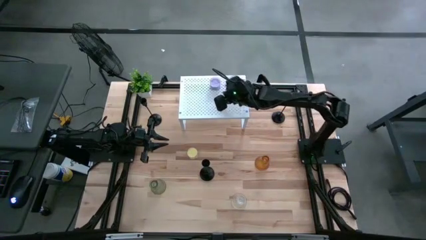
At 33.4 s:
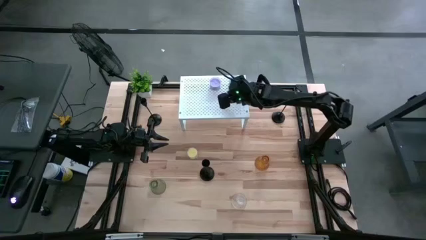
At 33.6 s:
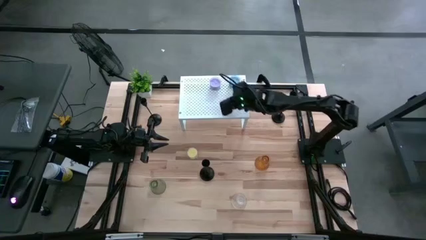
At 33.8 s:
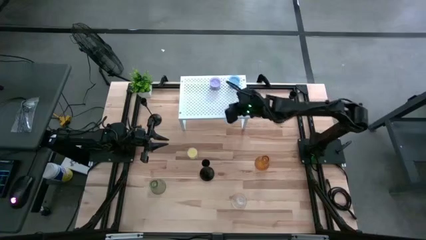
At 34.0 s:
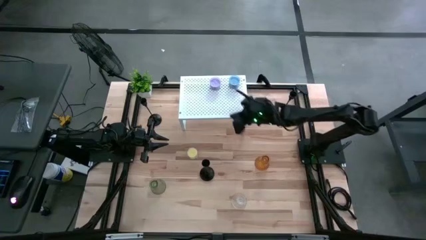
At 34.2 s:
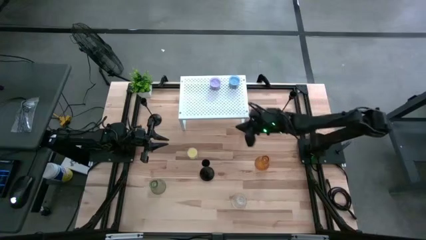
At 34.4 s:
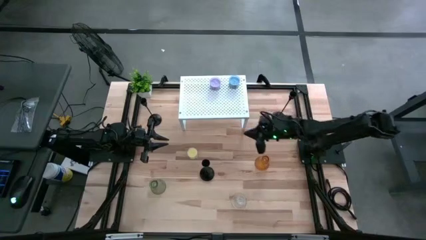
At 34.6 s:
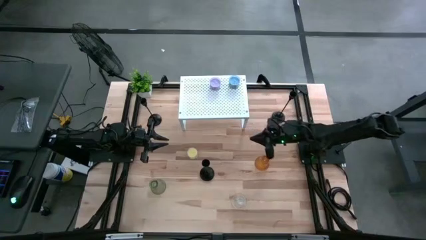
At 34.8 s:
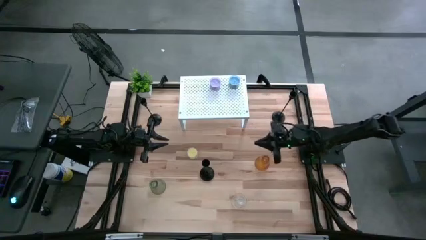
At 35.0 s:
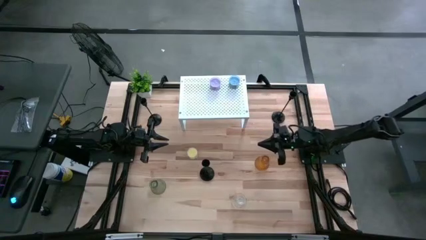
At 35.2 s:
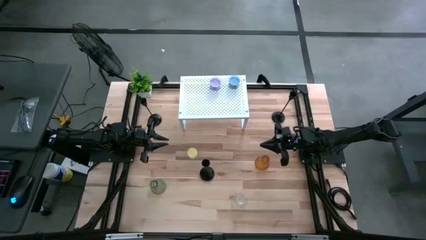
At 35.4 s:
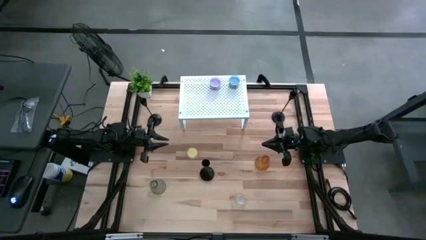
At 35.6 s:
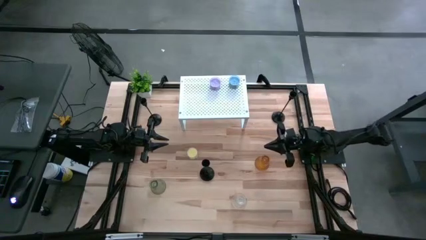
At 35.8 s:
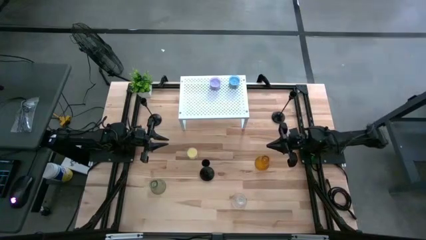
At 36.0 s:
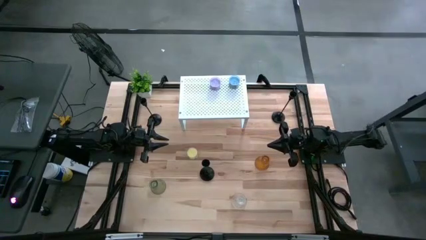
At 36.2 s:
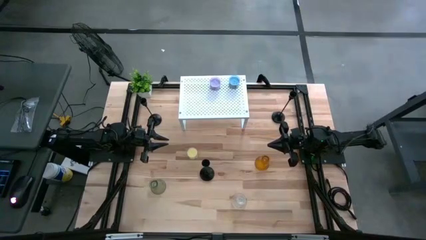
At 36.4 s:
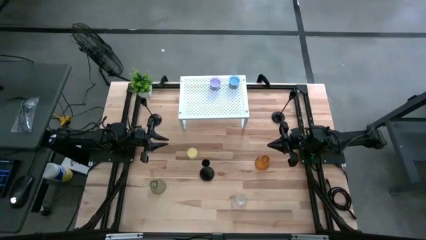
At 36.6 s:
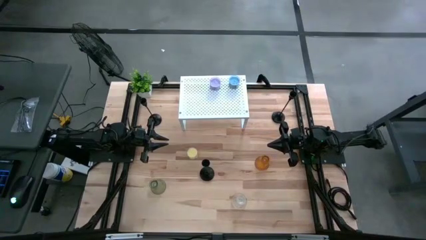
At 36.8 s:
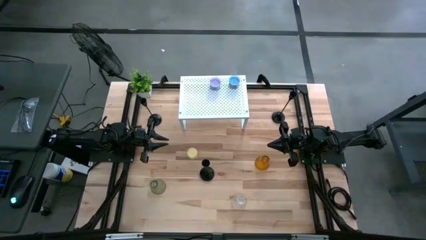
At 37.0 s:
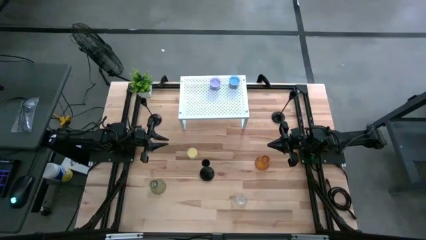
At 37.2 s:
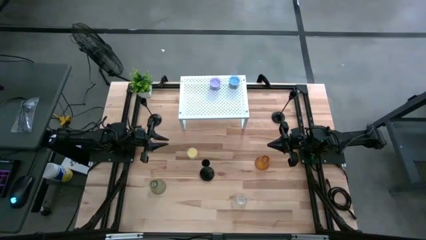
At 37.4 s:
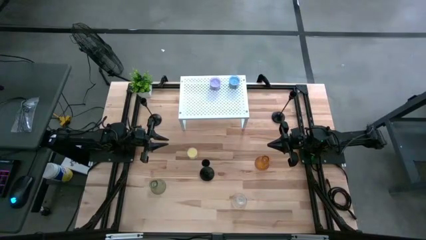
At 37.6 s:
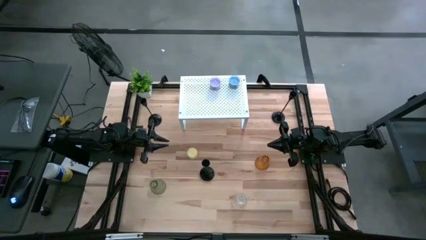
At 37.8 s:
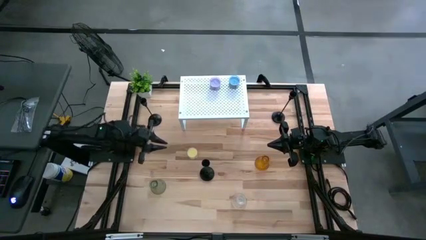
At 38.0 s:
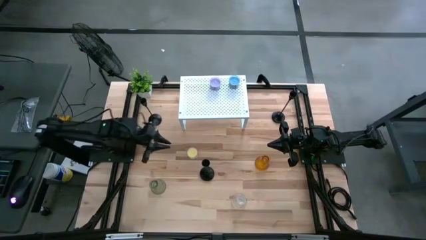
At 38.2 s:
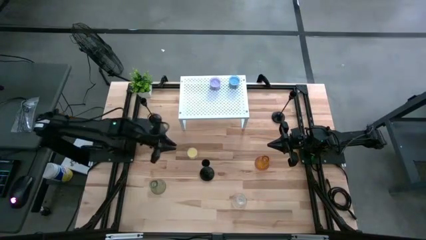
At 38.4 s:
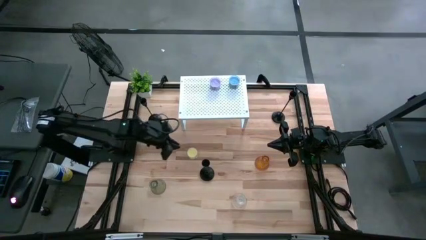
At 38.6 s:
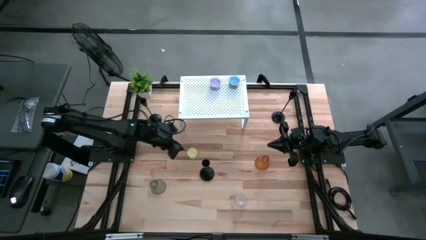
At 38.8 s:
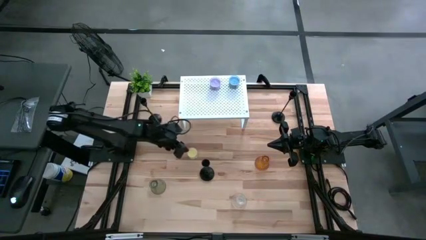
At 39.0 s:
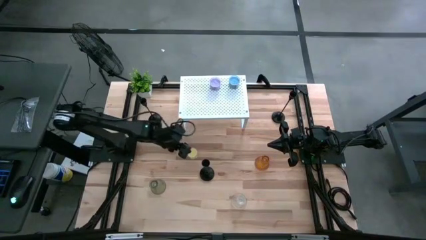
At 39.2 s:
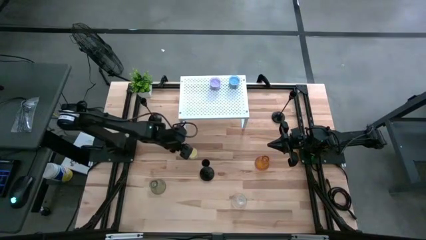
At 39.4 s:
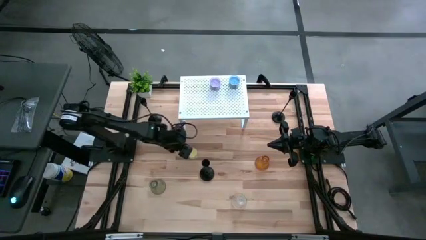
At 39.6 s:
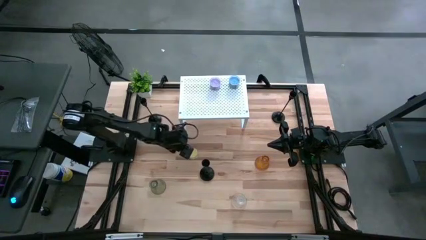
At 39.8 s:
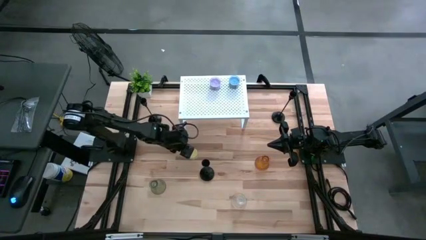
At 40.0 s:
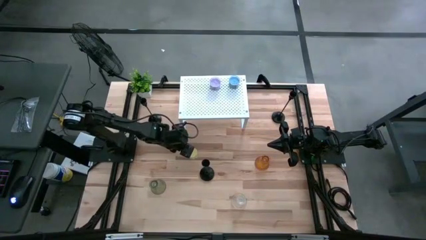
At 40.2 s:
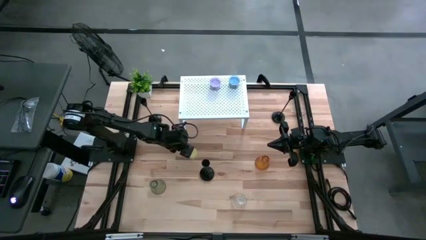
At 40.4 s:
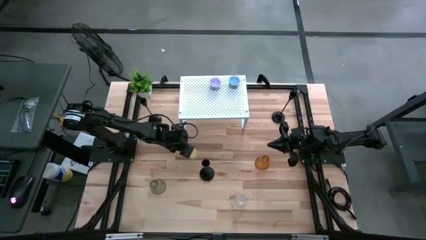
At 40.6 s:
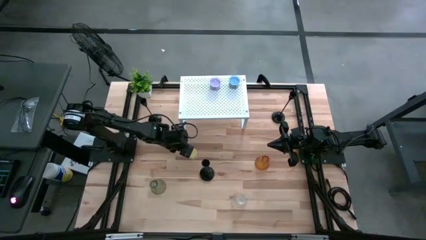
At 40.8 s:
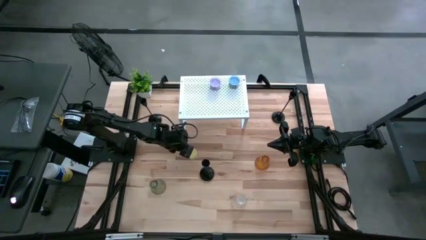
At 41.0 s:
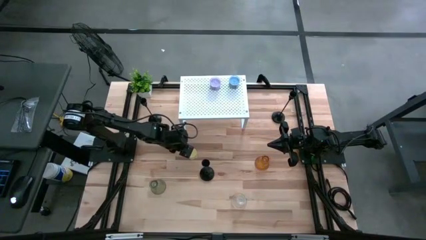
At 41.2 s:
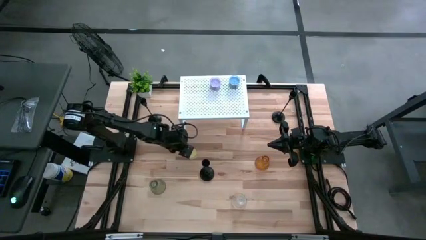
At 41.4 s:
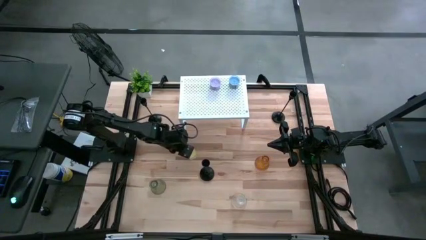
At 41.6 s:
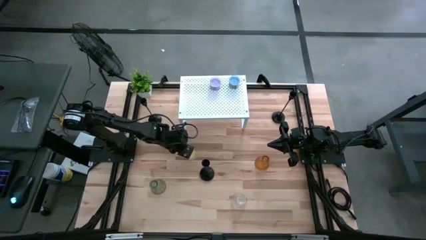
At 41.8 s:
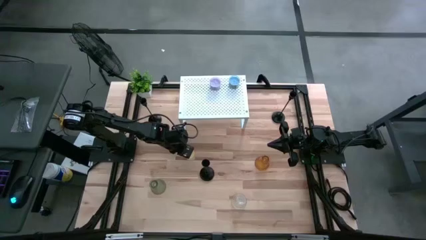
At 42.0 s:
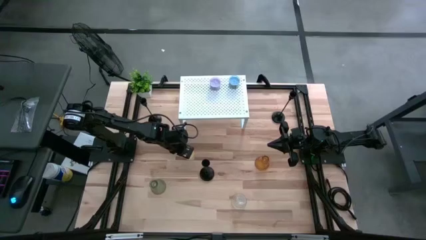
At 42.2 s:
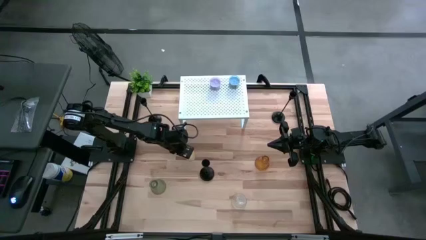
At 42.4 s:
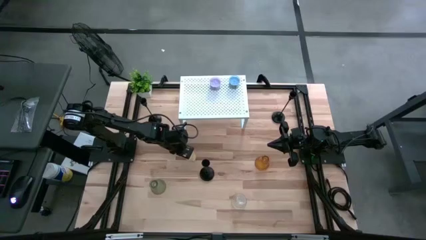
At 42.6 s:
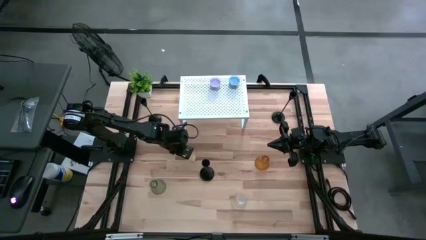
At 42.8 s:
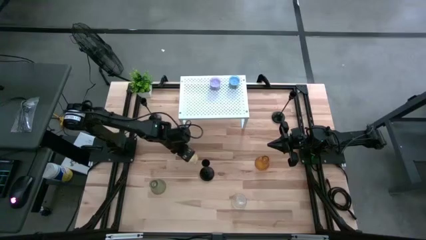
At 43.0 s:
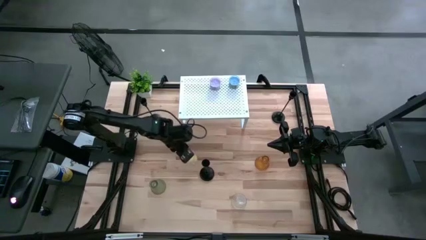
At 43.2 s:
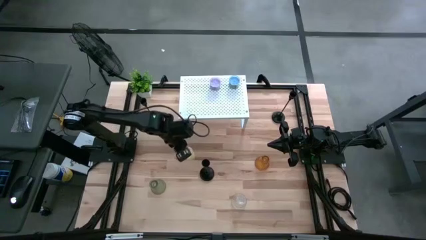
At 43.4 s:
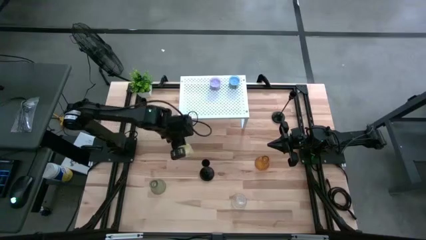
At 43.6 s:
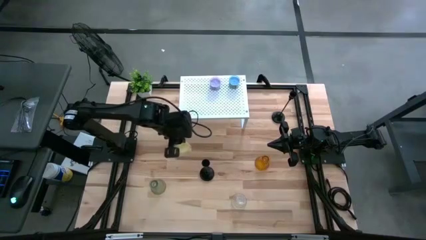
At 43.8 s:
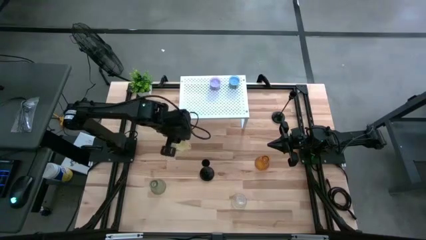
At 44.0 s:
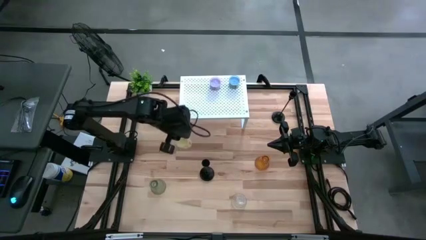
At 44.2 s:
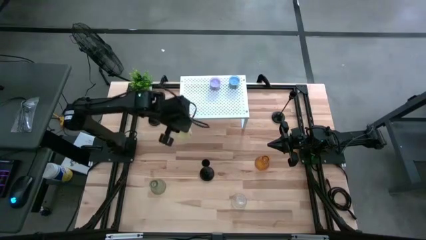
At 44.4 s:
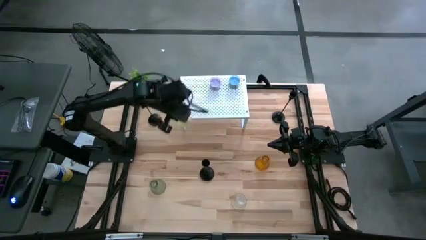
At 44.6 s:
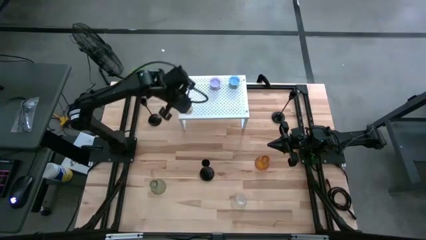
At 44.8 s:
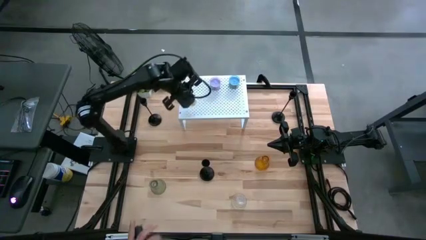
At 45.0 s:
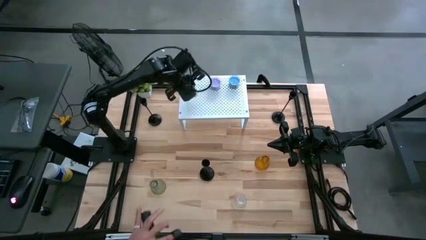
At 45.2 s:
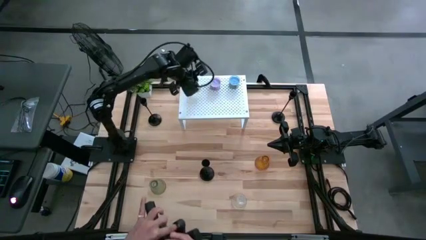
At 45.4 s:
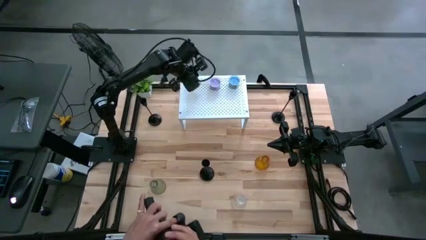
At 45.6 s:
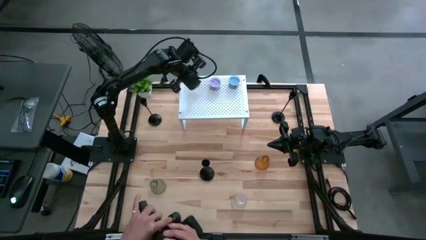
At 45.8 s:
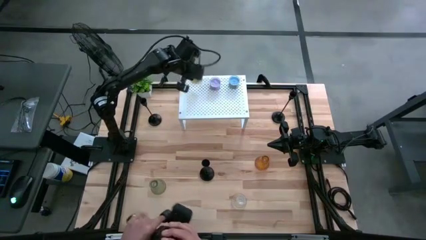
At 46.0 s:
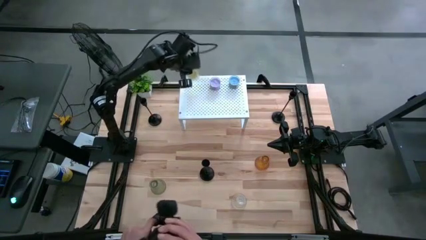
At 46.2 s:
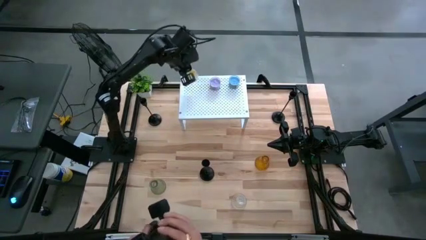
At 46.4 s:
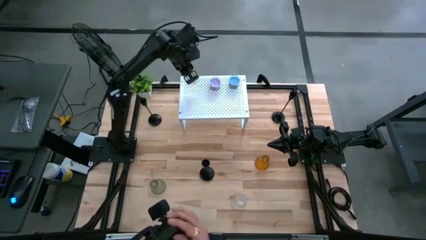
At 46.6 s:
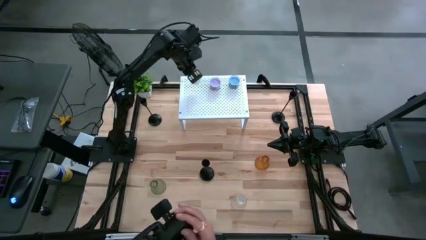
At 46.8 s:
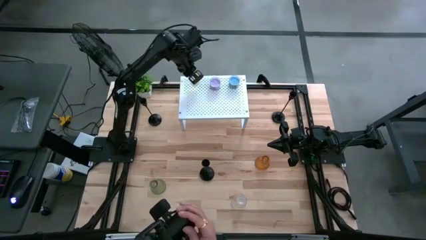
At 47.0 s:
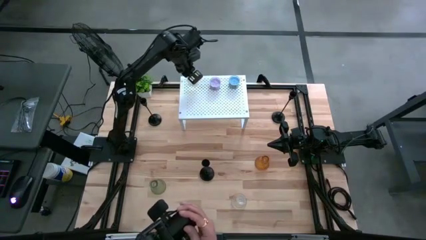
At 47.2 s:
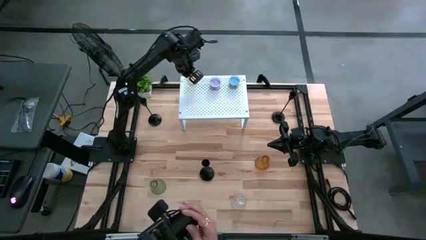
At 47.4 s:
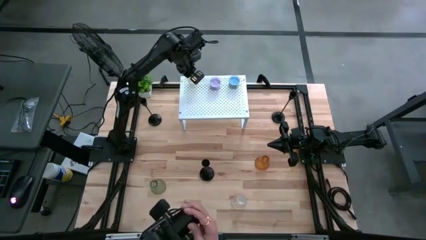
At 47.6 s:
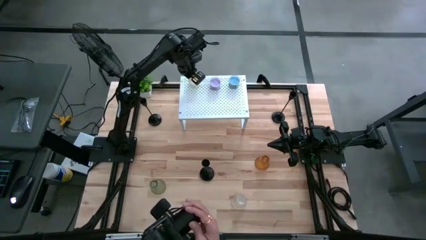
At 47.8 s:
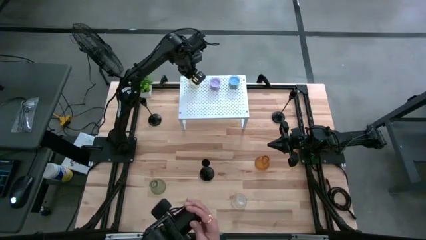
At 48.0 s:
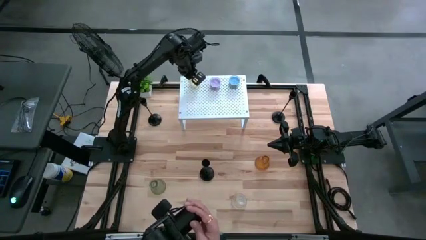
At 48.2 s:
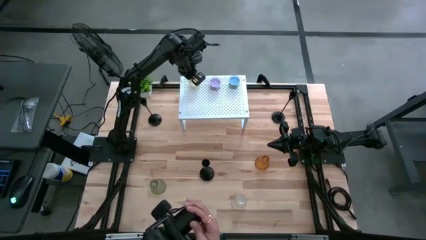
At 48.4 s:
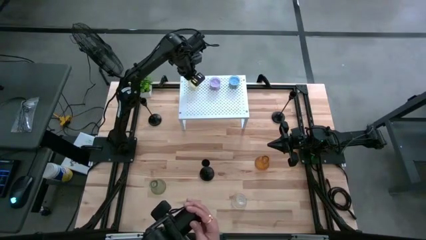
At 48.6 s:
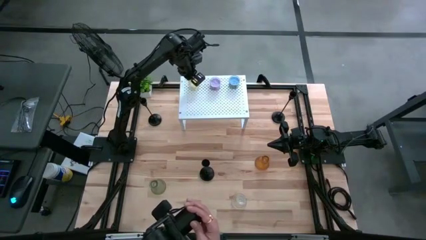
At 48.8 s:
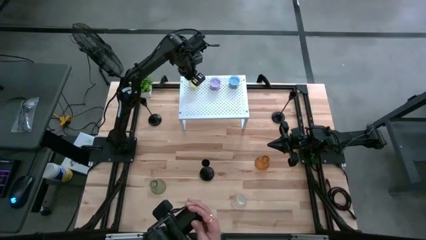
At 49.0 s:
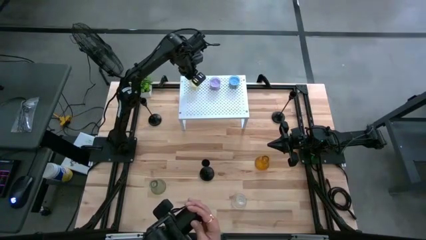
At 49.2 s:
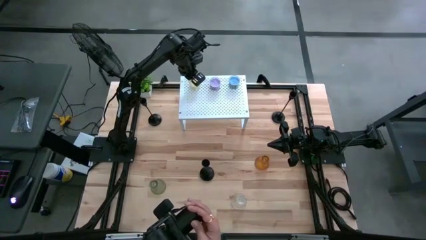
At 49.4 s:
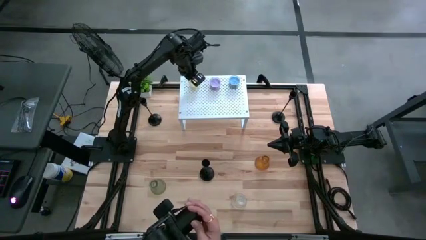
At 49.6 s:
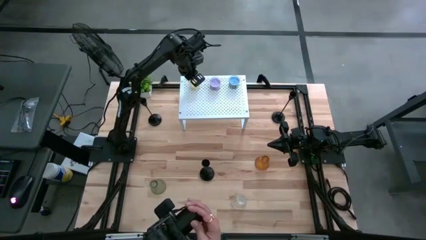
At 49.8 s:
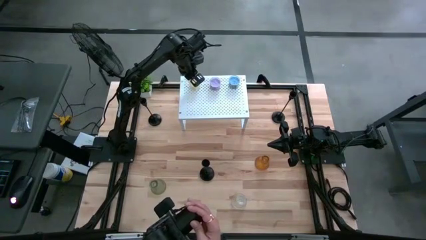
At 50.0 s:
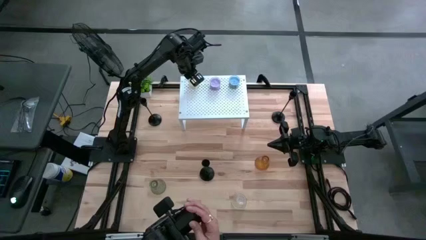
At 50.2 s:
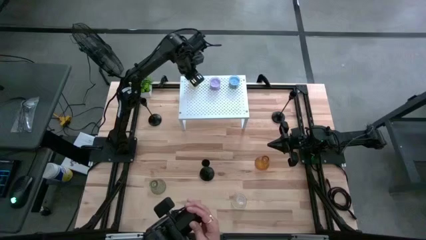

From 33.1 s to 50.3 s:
Task: Pick & Place candle stick holders
Put the yellow scented candle on the shelf
